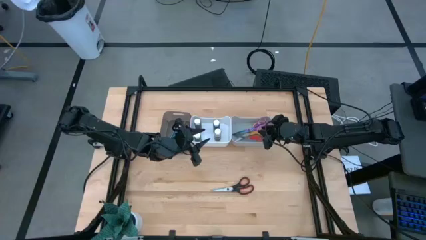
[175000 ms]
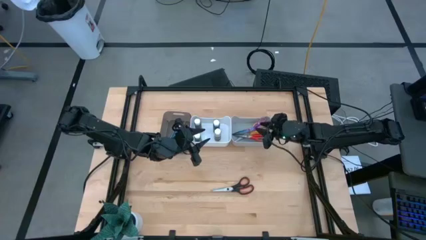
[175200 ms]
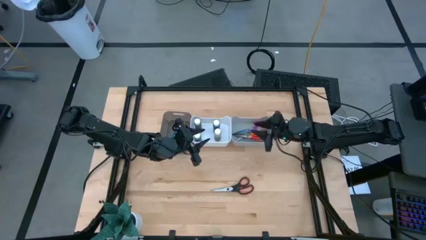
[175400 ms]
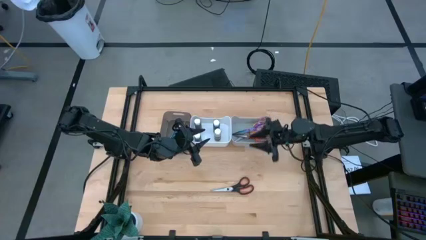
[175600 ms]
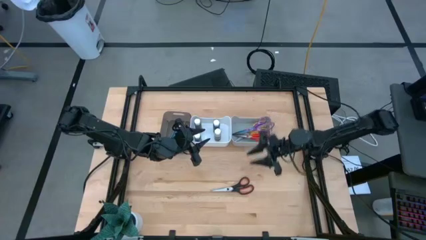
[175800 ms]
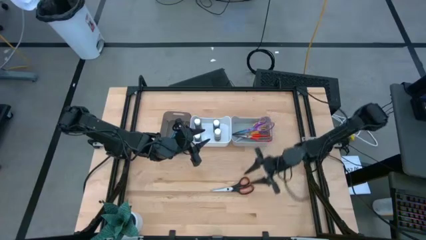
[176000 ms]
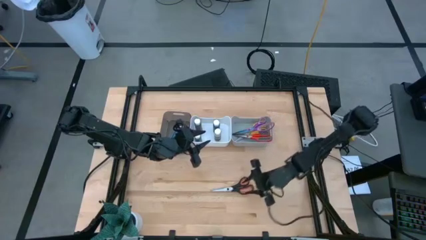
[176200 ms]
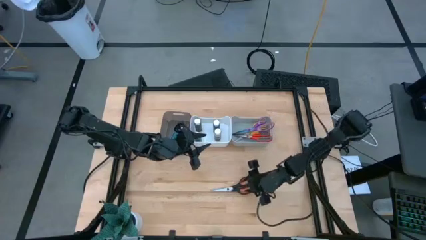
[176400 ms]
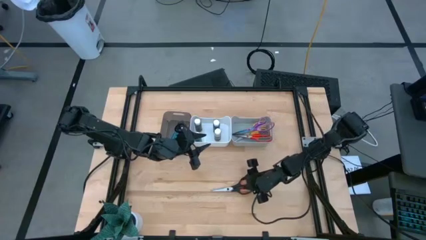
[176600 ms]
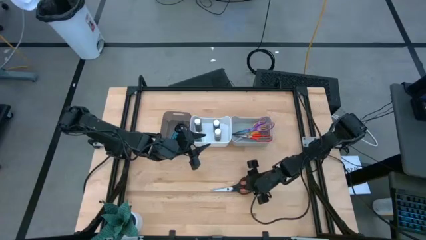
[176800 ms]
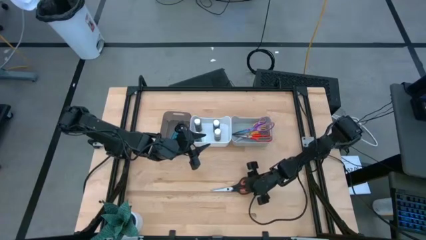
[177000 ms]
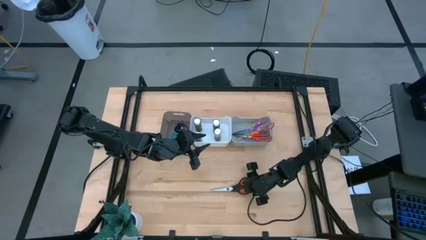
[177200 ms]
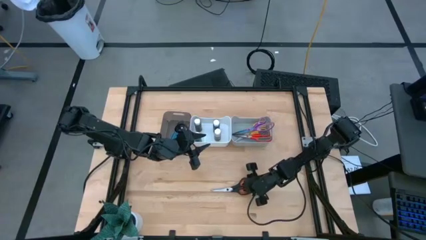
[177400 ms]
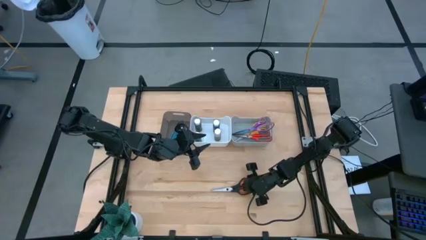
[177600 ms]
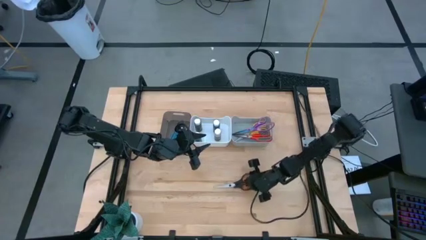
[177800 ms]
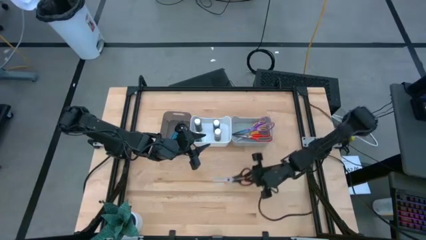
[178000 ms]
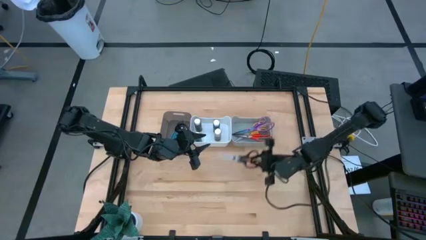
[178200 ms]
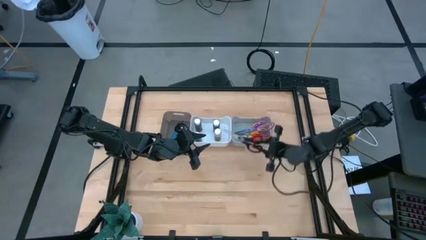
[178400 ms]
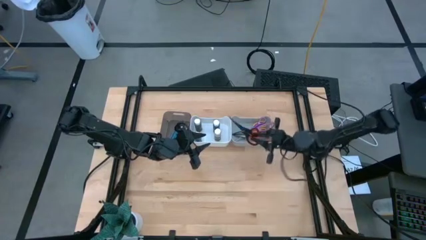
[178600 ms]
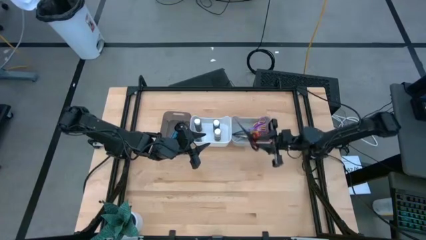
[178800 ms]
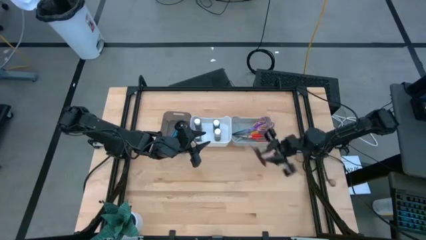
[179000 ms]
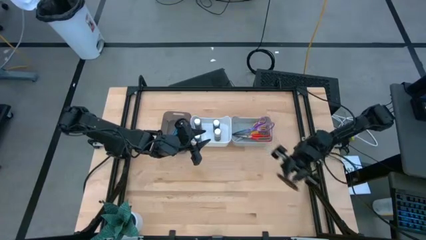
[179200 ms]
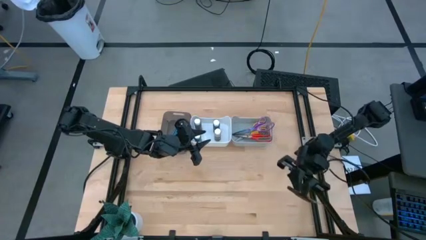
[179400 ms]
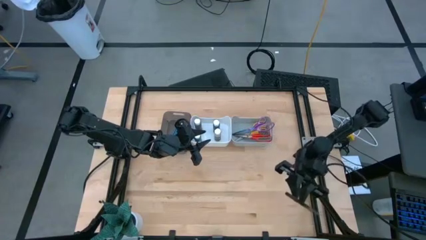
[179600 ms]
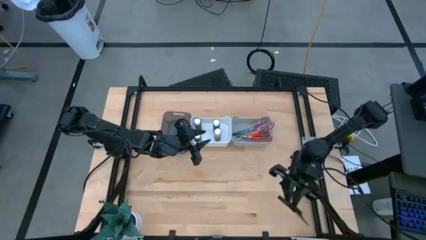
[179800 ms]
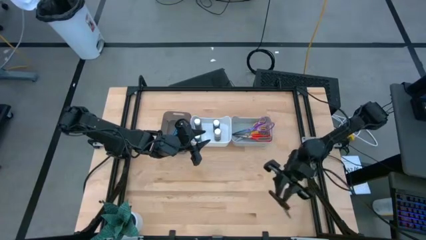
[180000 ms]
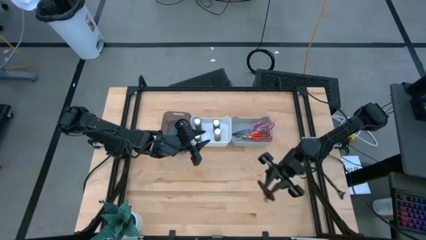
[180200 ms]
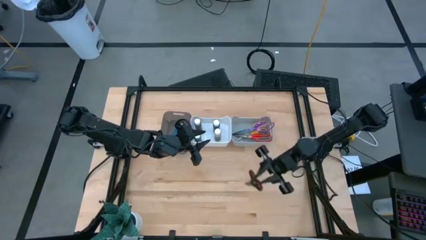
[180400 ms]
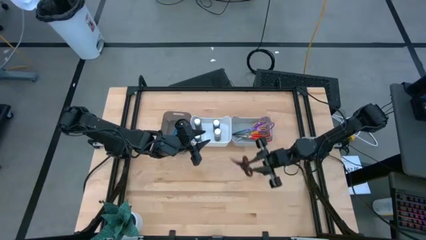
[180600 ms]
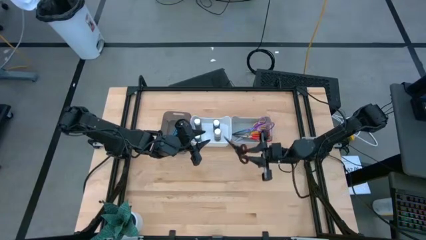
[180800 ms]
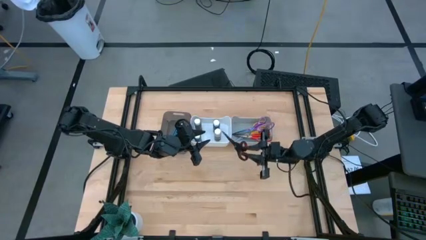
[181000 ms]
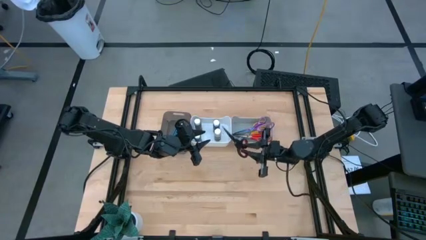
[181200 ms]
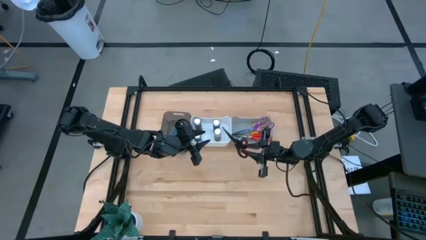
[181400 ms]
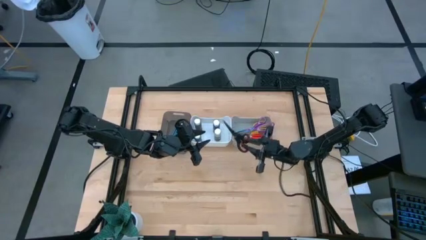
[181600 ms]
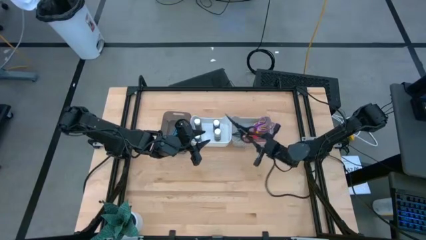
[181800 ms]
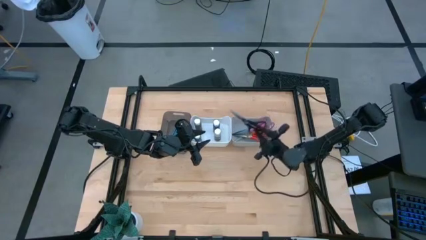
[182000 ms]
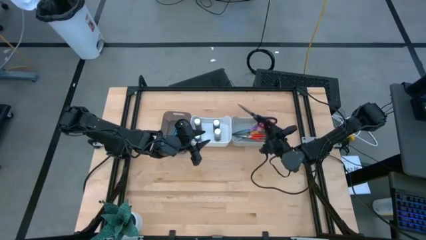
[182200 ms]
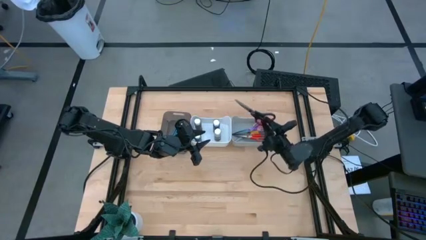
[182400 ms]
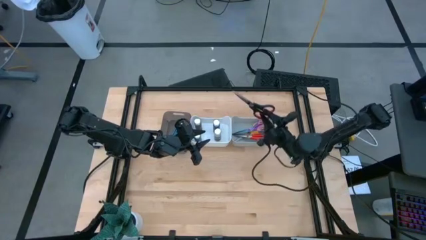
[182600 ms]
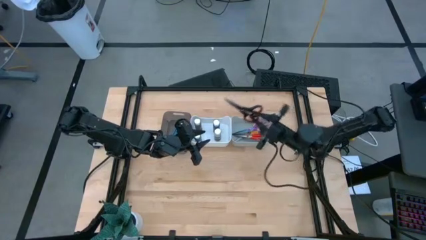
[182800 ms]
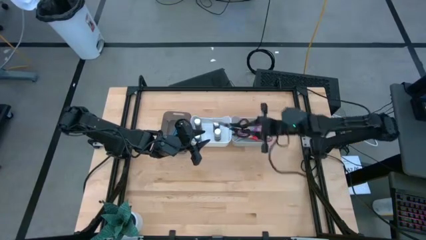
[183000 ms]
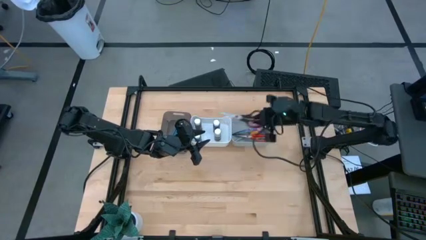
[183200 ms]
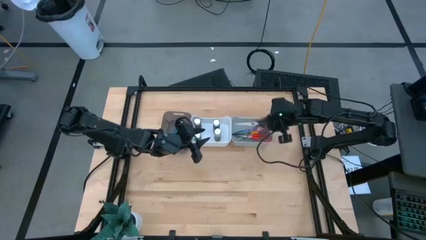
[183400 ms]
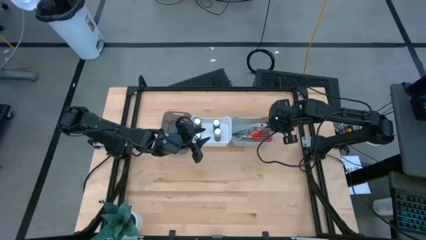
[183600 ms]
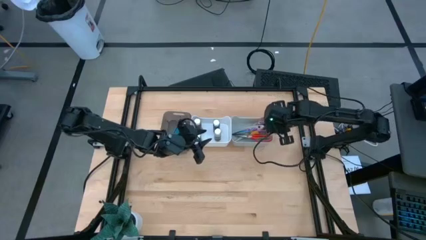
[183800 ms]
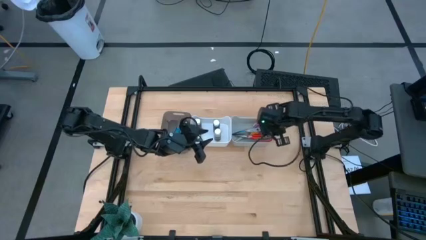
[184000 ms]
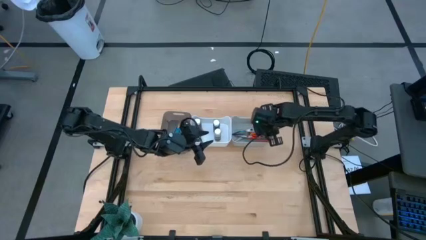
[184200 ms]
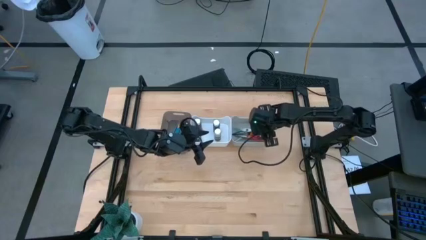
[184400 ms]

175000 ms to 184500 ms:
Task: Pick & Place Paint Supplies
Put the black scissors into the gray bin

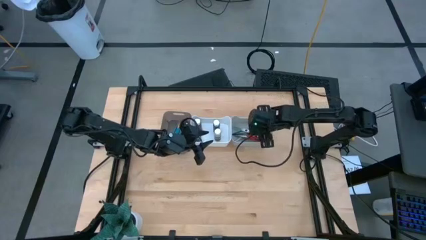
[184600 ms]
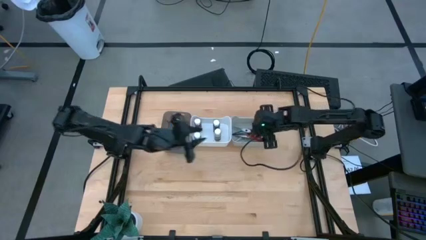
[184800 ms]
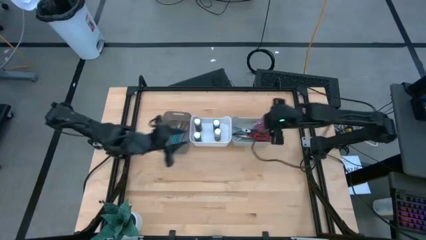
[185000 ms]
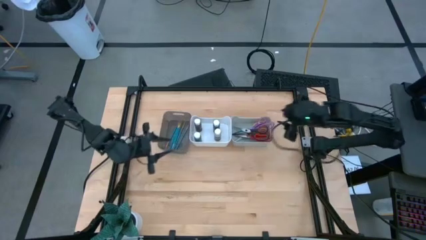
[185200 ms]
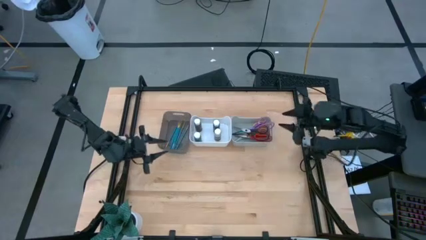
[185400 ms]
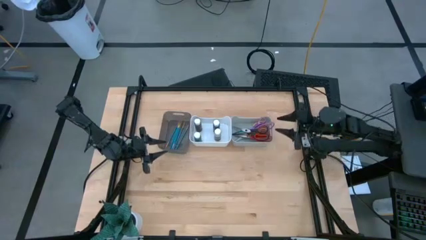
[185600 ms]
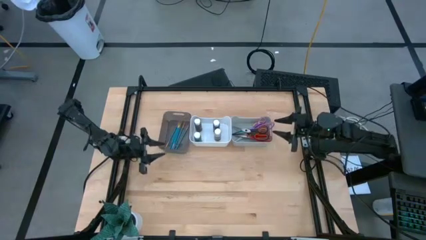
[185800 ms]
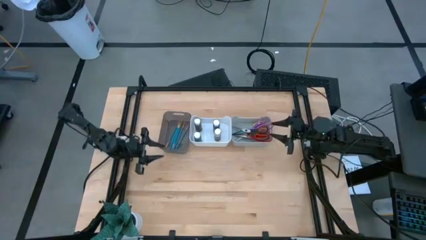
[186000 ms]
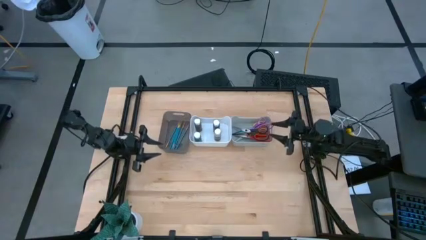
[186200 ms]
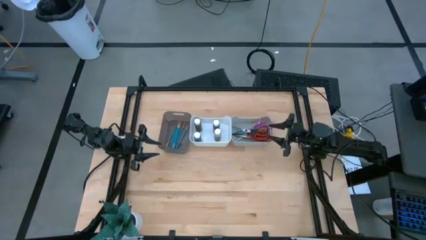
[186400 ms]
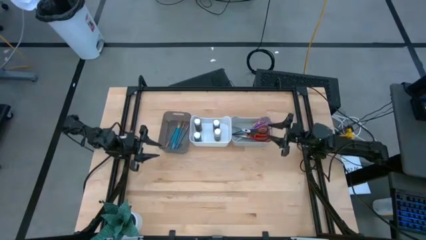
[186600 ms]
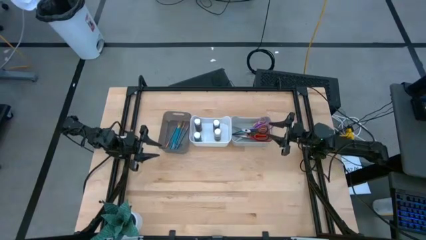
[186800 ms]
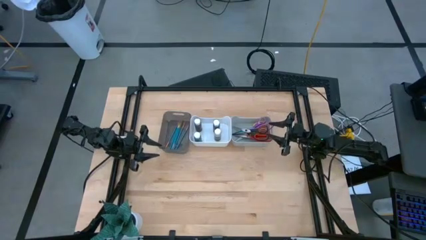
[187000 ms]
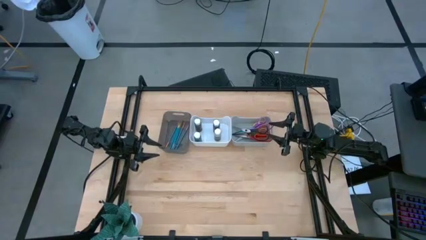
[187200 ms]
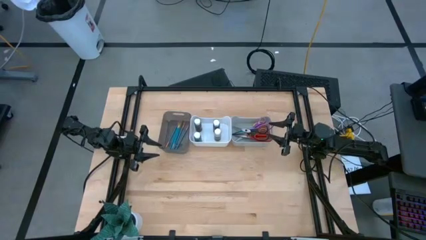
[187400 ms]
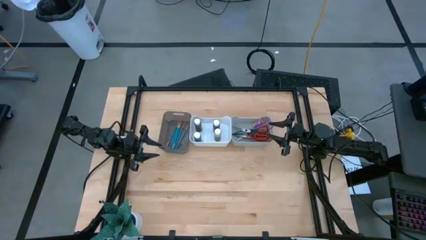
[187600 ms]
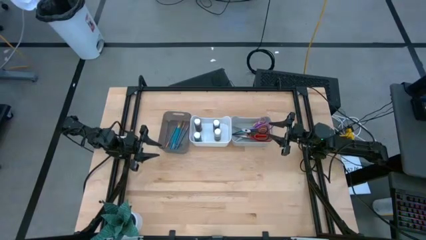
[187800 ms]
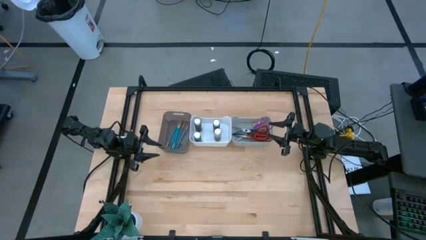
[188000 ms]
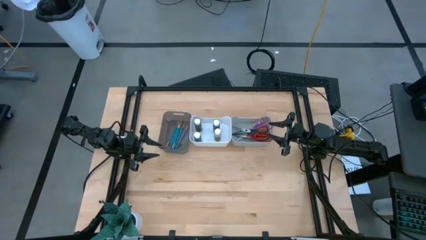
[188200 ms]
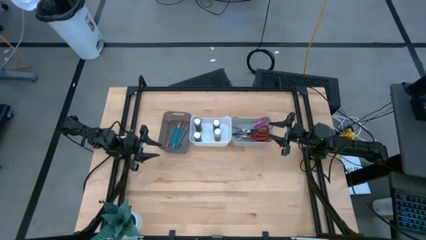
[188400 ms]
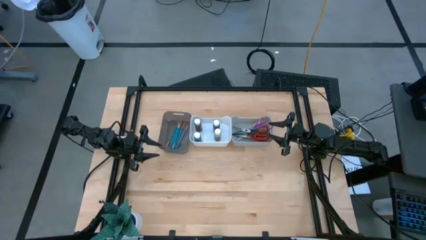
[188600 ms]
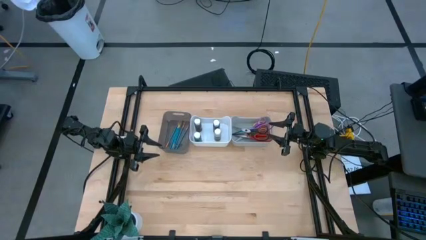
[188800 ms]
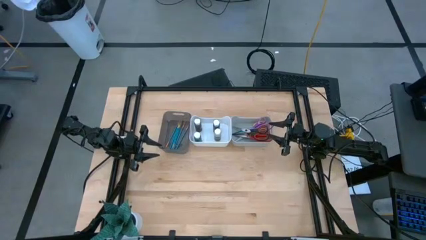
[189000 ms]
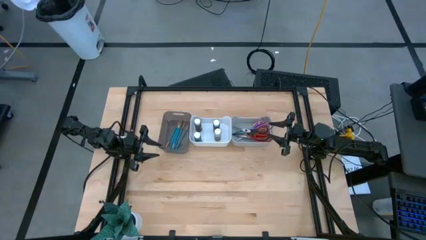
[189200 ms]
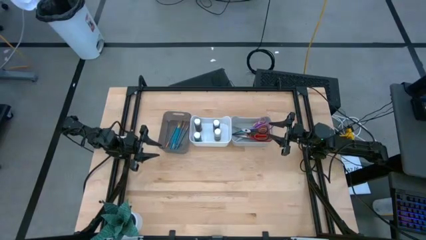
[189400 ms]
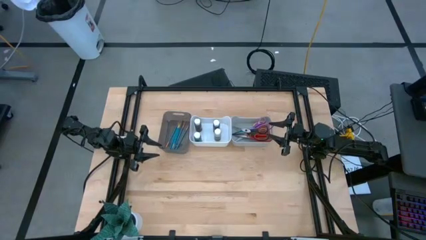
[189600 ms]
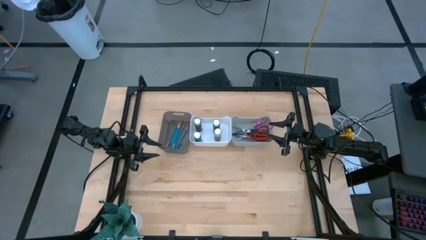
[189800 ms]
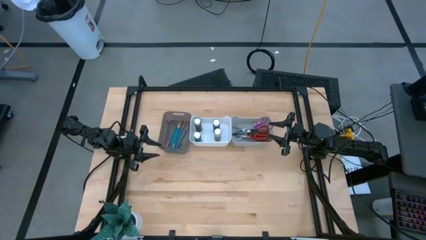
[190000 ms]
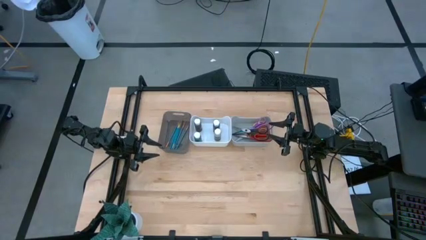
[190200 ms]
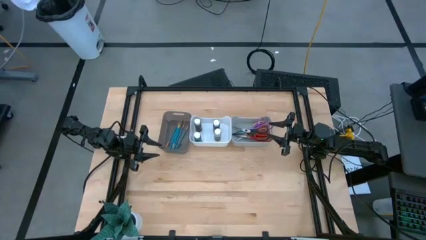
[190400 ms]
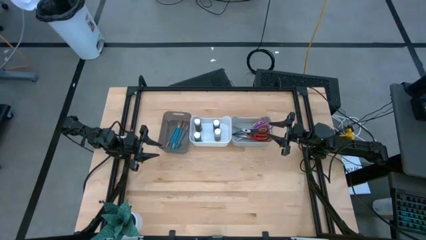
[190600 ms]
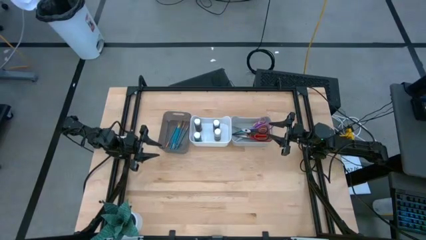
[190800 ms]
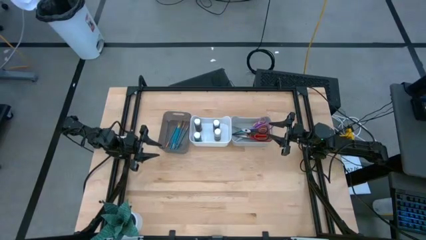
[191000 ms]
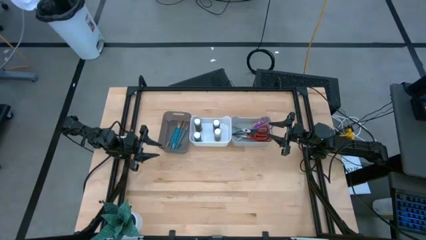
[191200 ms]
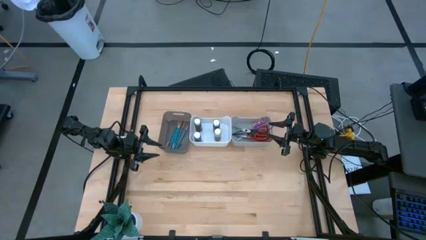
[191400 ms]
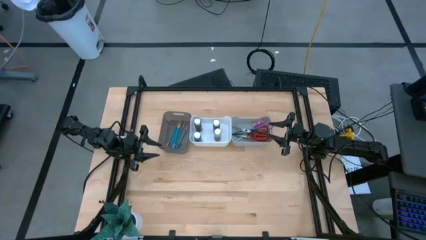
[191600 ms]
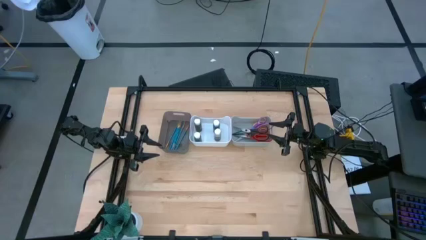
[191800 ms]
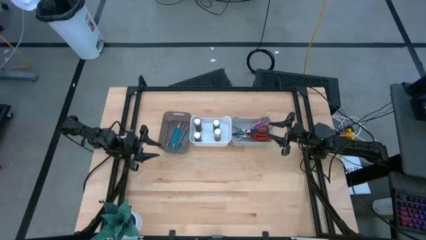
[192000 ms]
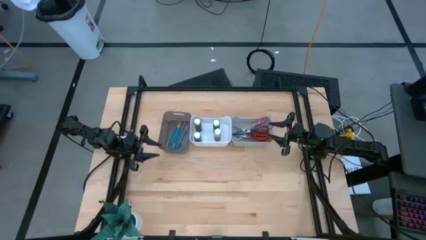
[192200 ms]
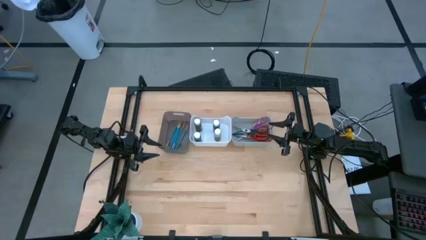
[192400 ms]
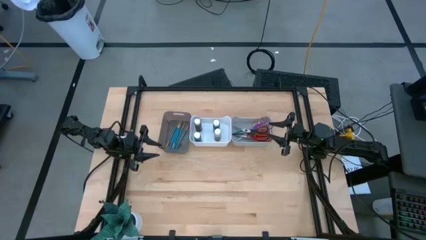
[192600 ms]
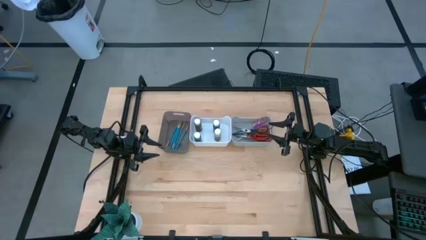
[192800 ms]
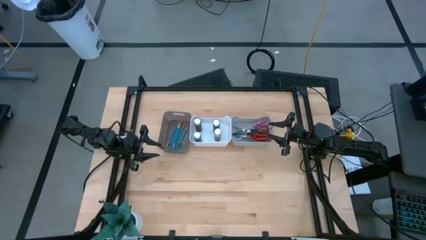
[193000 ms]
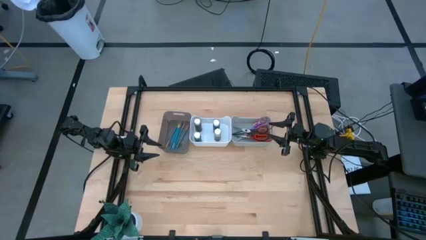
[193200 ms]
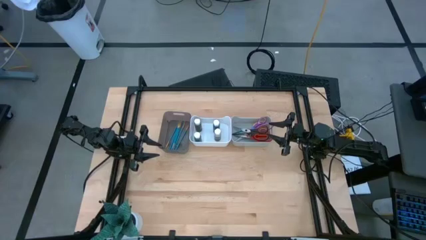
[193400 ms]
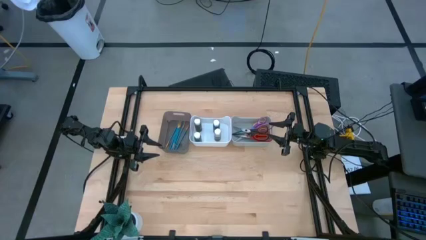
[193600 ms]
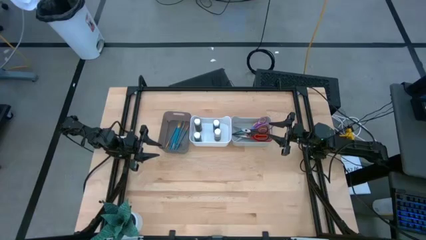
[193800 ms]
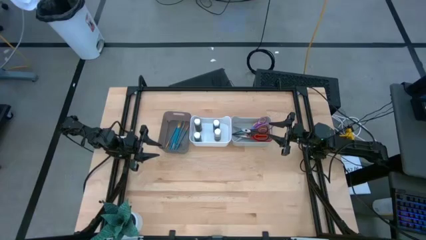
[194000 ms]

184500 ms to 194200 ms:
Return to Home Position
